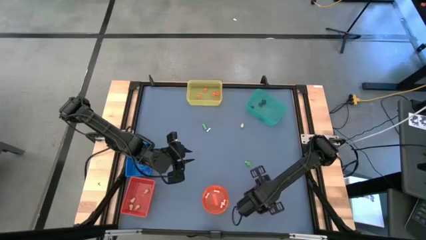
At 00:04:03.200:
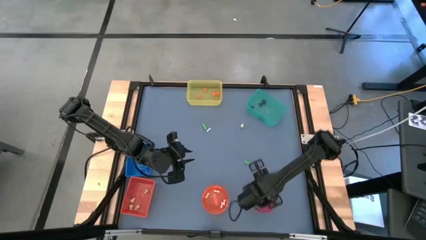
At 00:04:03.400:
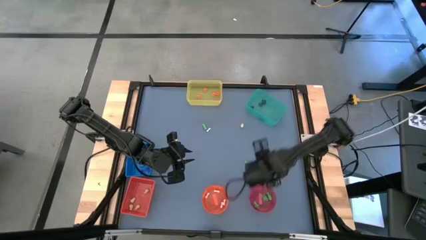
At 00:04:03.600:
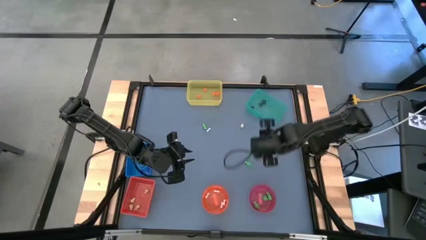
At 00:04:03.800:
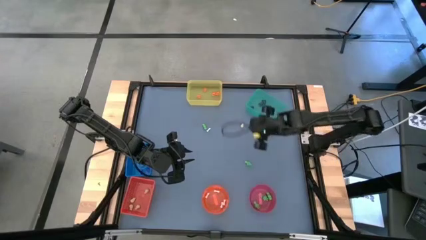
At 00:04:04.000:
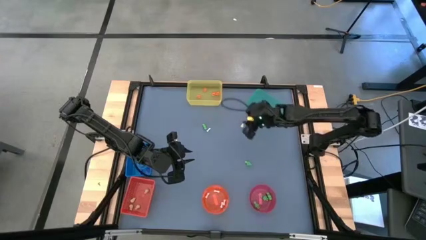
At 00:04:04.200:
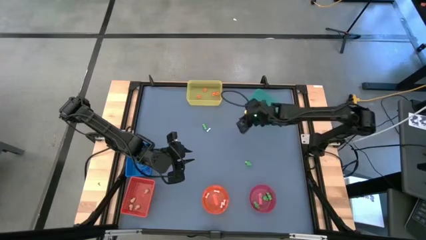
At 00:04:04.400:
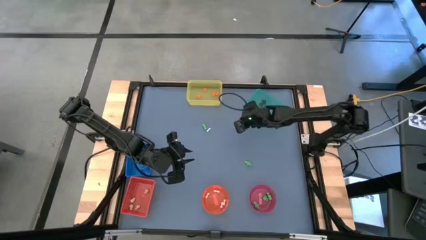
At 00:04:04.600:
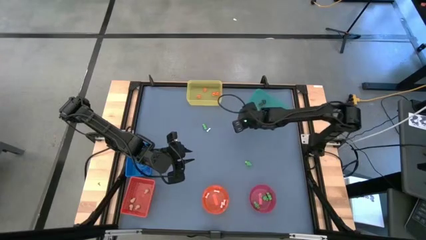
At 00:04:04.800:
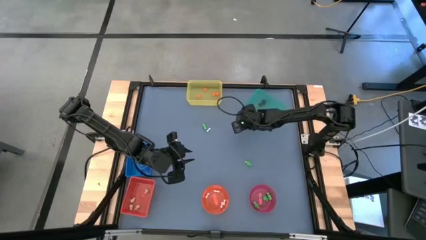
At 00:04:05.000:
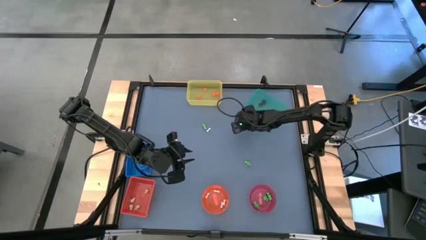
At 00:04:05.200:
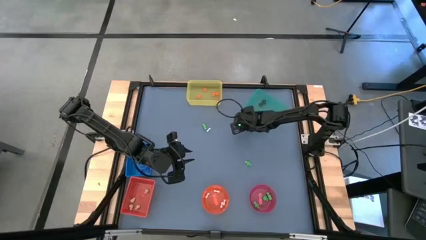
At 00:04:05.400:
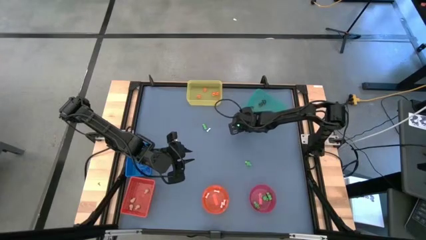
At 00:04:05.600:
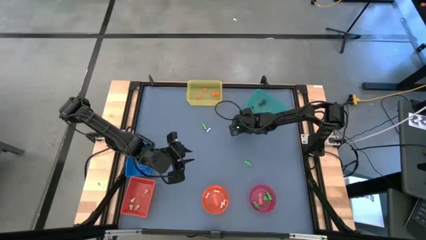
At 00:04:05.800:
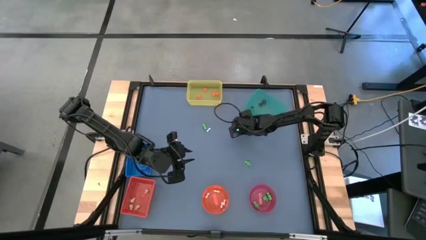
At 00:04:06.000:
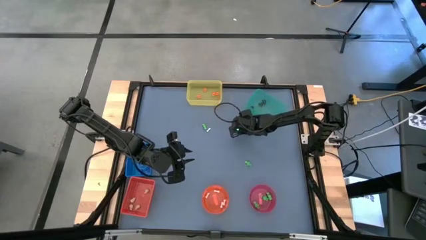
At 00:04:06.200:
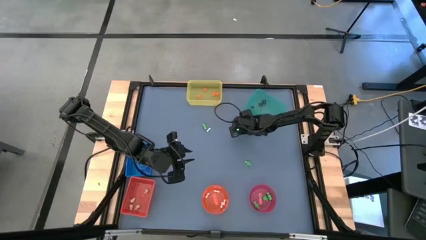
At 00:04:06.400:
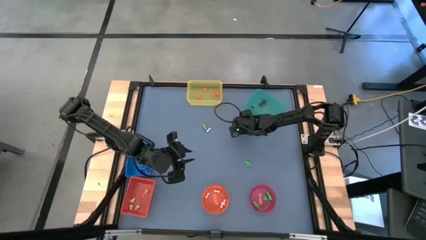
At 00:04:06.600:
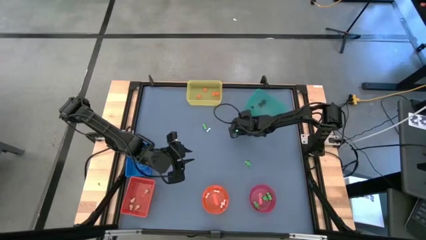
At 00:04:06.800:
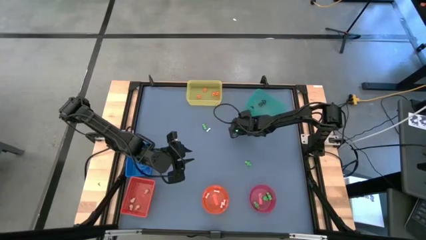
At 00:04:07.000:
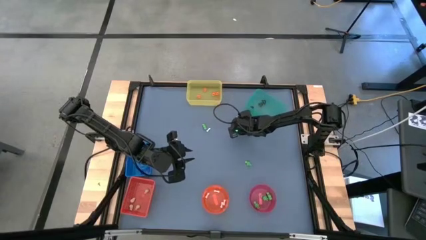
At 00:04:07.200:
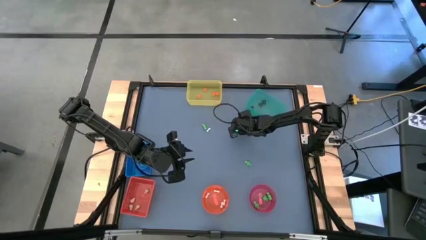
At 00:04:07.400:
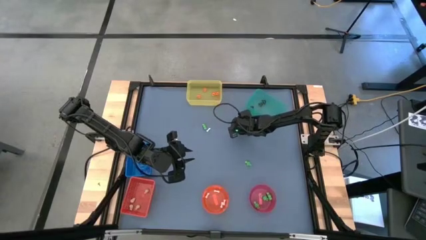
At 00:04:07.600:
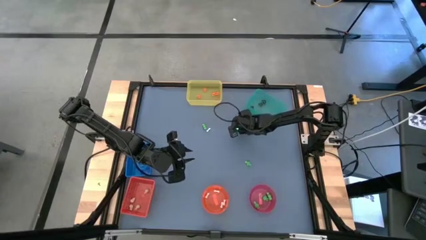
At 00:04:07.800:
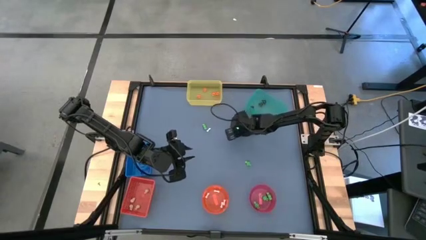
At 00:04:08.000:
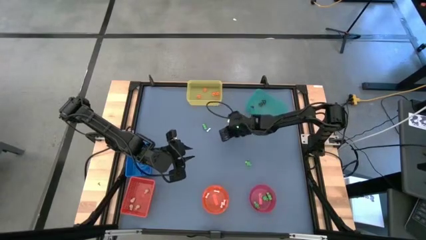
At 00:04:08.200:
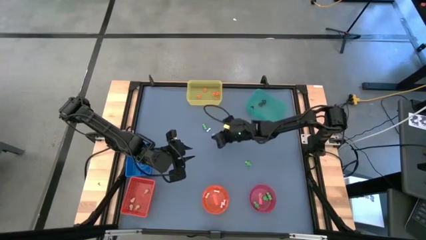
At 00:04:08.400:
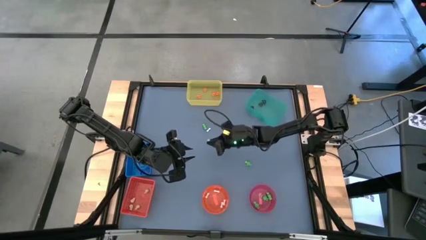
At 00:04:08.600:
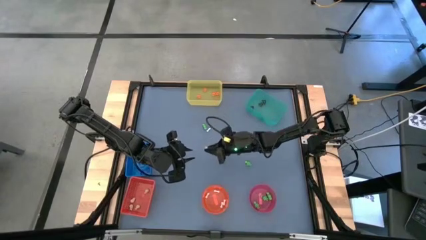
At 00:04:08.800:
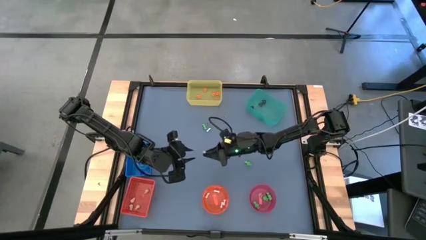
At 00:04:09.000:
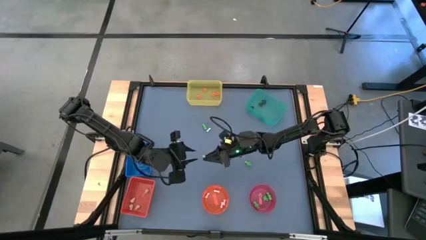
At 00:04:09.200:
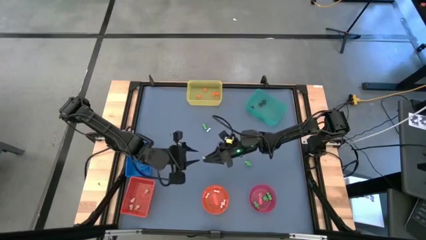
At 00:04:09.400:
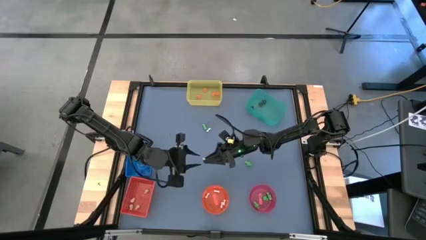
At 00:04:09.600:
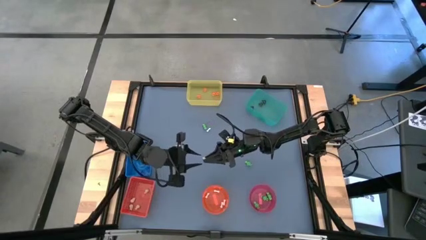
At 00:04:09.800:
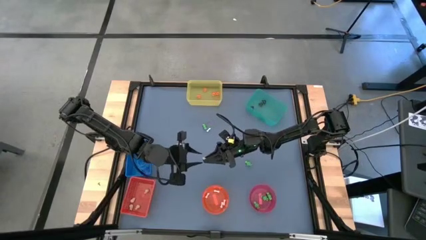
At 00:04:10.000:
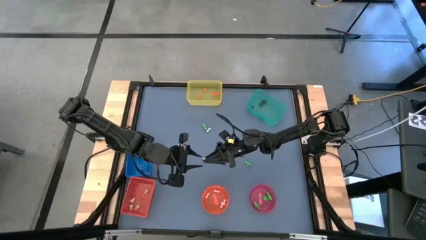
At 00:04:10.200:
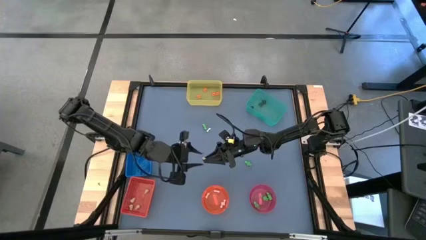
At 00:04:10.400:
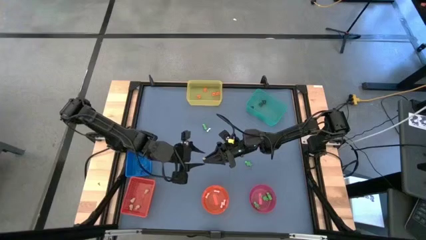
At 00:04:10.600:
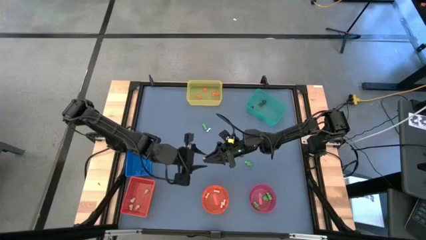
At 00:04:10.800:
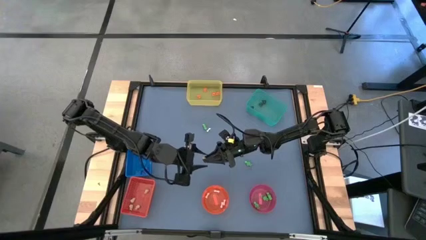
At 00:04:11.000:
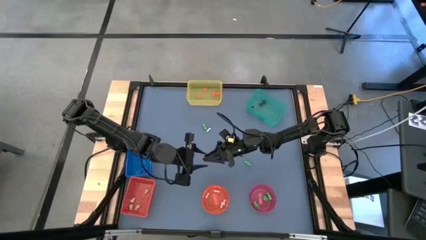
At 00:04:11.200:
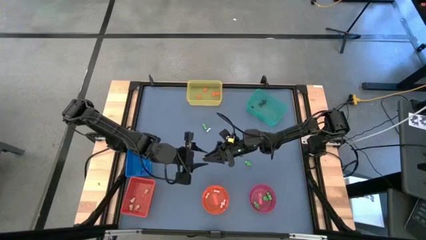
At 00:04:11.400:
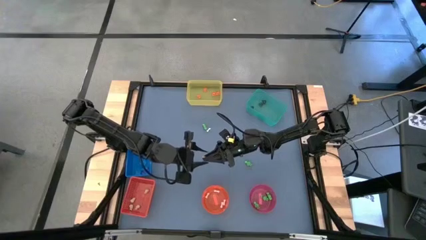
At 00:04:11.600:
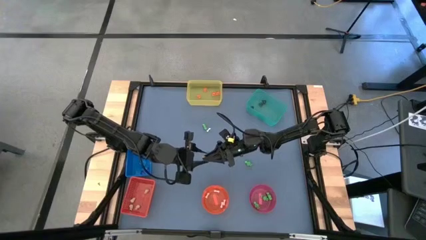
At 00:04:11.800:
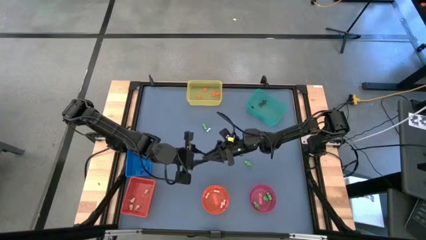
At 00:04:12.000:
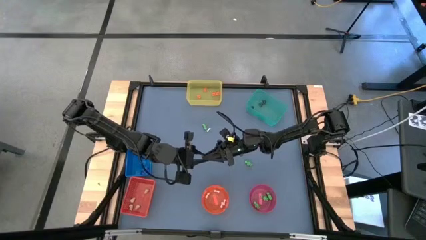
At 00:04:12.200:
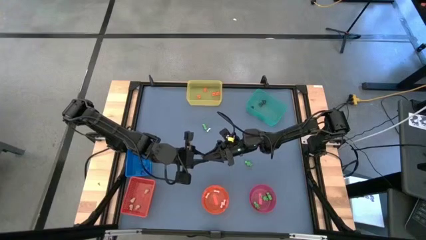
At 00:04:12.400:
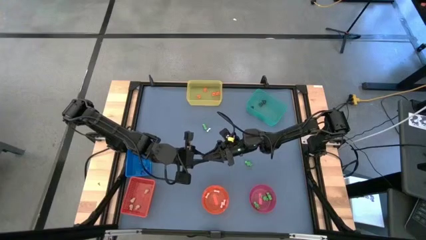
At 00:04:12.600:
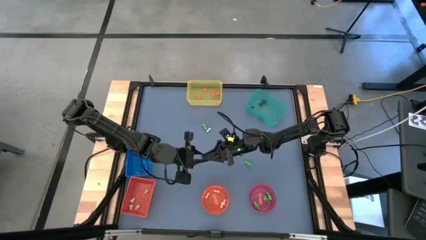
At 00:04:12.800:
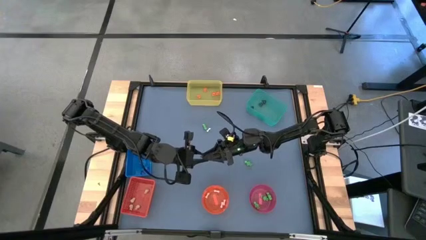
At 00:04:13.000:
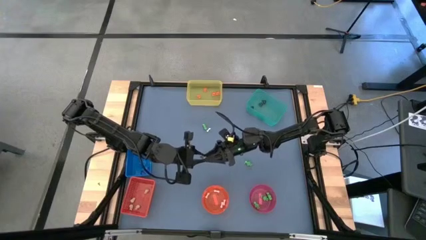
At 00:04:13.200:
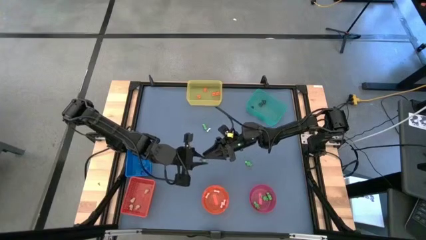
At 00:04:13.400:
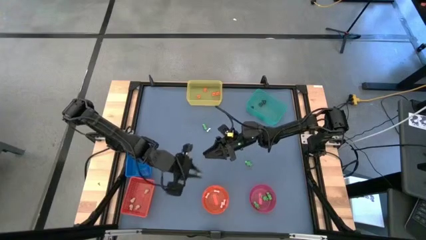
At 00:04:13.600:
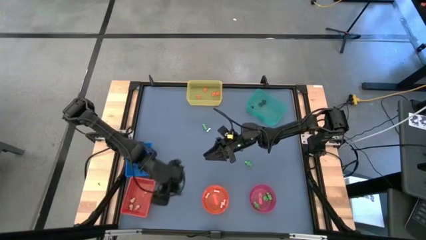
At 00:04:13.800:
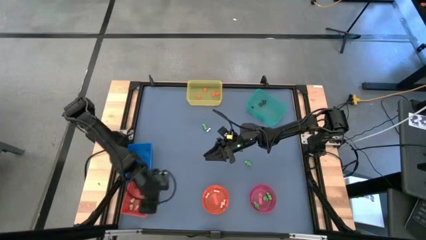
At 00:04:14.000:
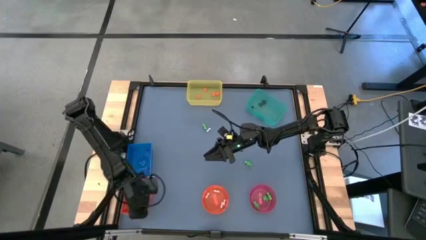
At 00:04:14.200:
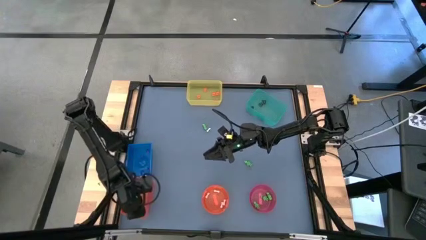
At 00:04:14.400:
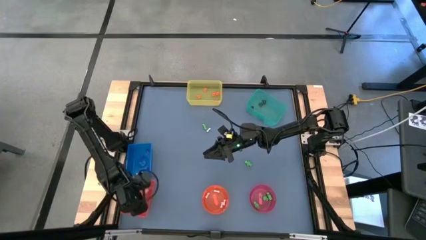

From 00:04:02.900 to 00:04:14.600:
Task: Sort Halloween decoration
Put the brown skull toy into the red bin

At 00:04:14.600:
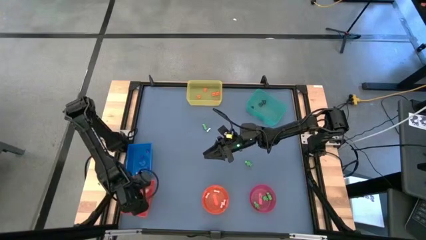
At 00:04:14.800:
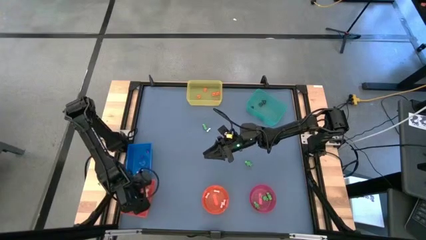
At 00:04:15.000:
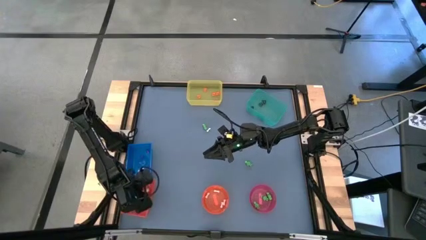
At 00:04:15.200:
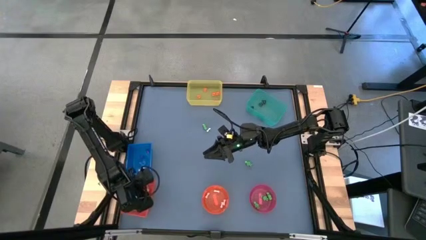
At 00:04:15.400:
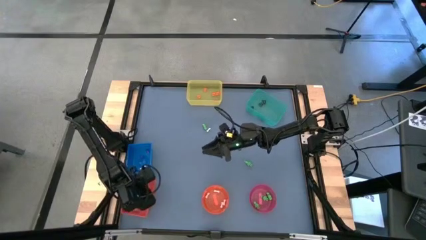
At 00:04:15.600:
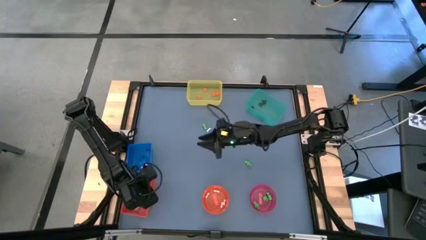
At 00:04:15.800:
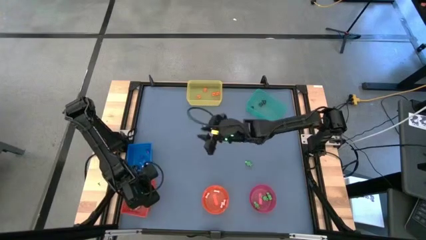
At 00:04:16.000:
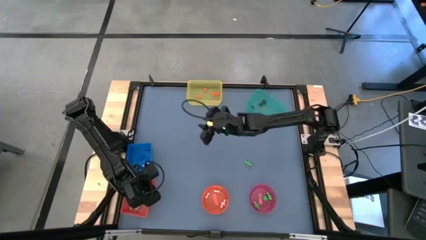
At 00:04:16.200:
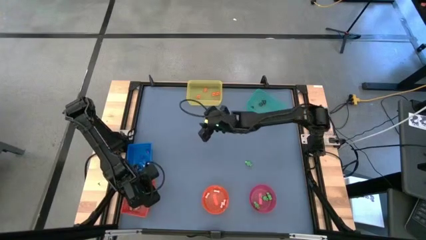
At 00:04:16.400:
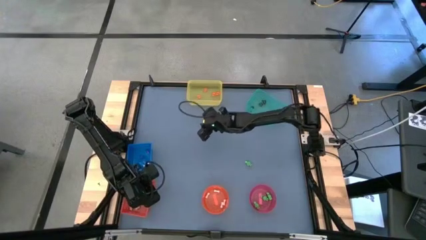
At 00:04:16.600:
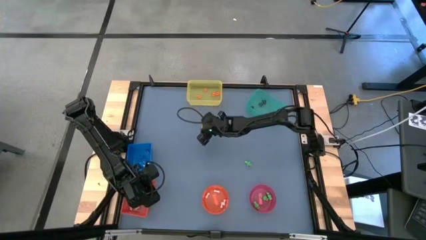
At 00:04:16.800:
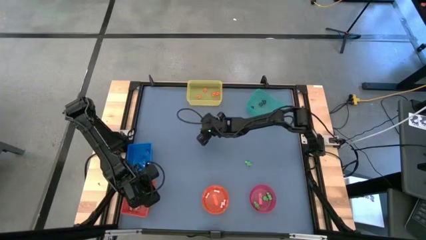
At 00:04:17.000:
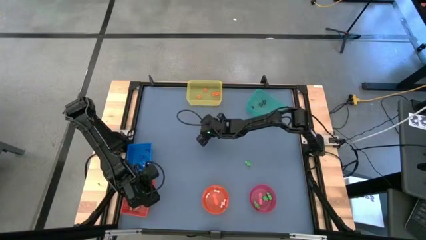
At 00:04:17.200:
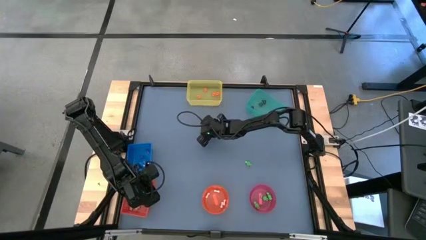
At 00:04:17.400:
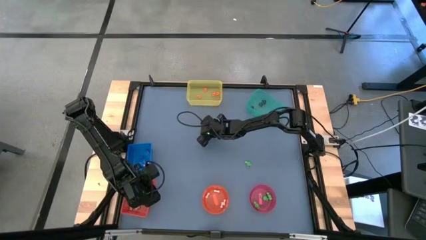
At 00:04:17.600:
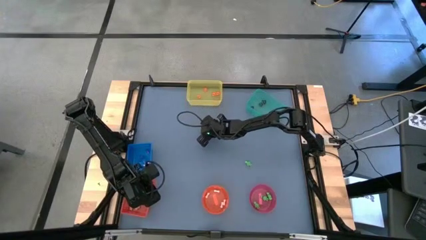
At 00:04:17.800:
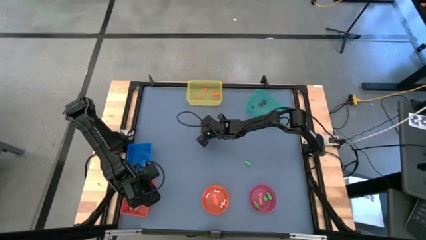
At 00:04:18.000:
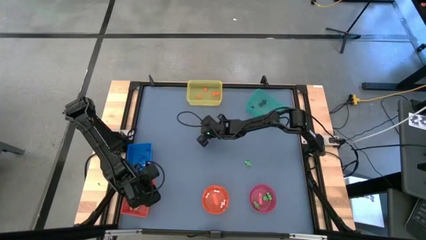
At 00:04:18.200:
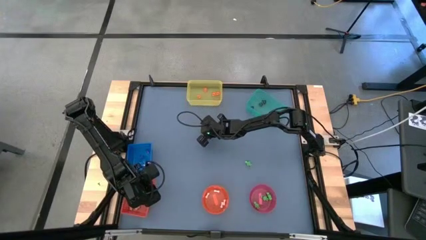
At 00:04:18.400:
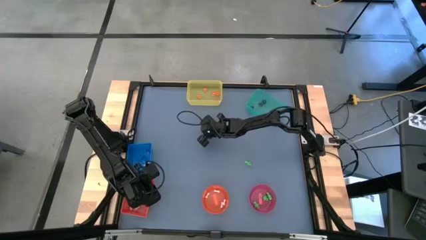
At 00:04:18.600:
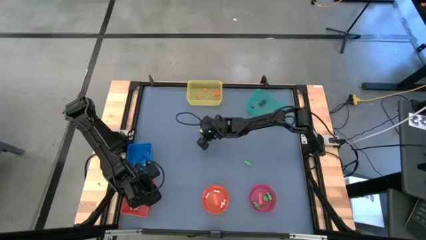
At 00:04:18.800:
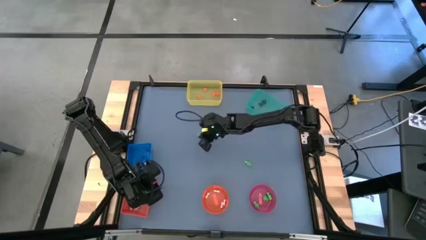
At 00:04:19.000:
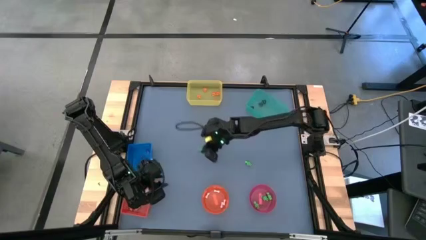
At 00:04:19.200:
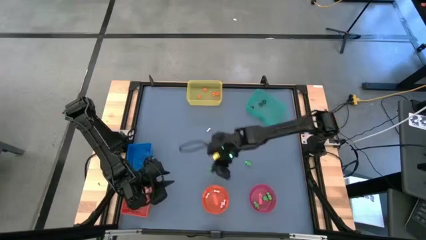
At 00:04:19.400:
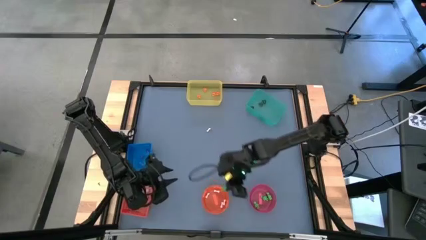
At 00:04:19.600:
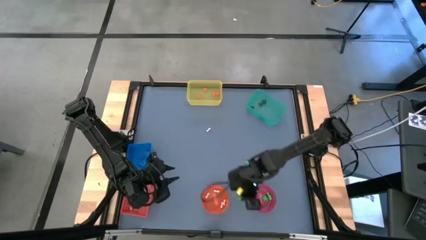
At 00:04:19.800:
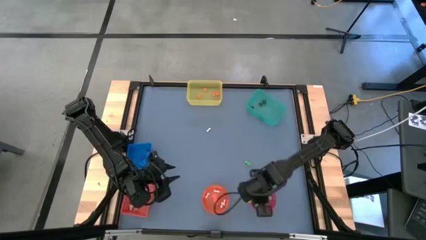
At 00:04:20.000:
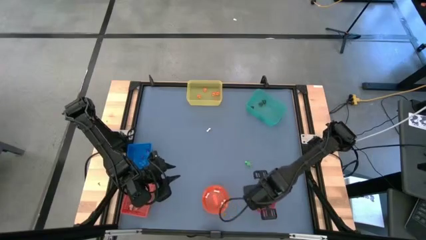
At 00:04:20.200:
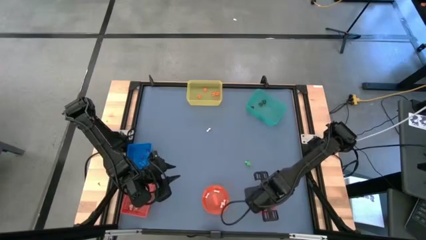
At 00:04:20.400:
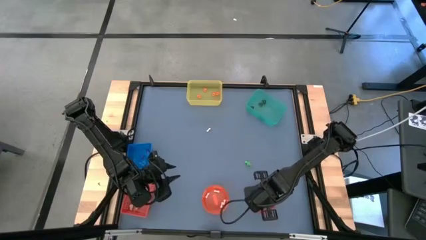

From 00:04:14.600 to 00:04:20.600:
Put the green skeleton toy into the pink bowl
